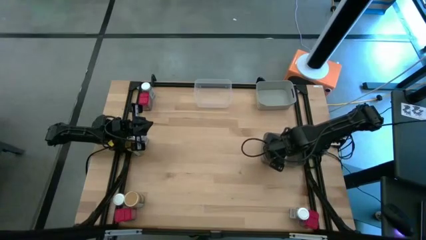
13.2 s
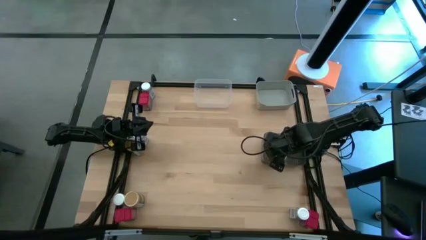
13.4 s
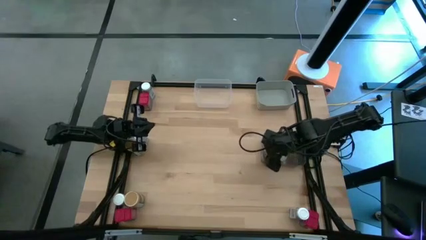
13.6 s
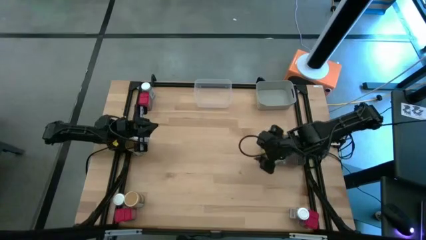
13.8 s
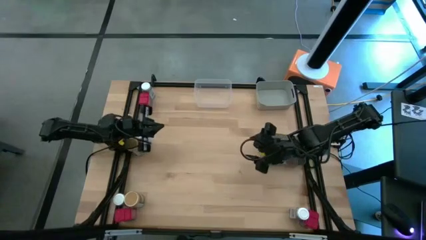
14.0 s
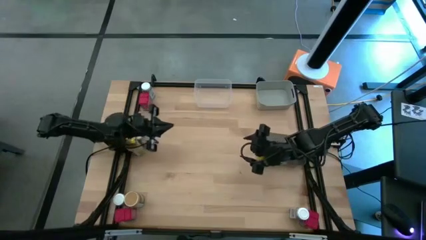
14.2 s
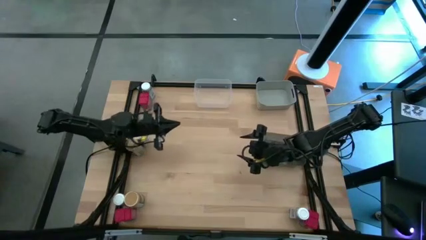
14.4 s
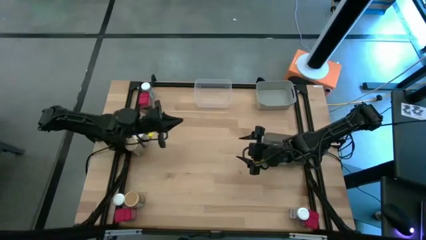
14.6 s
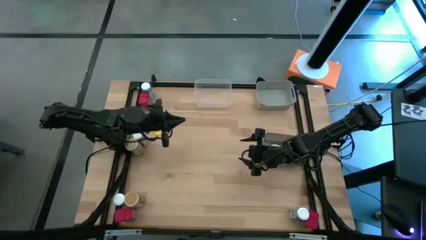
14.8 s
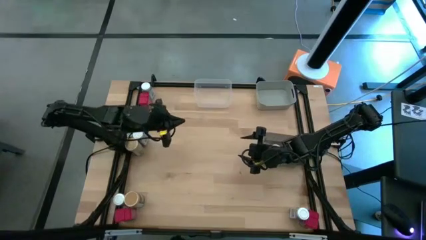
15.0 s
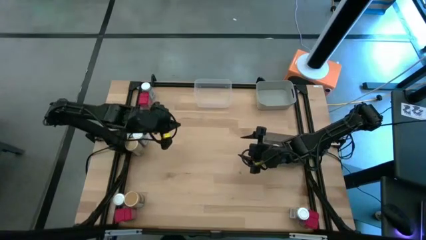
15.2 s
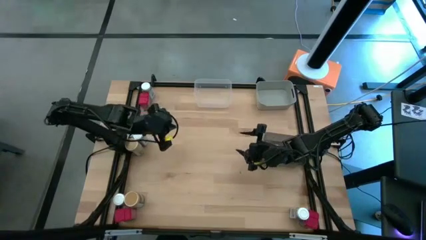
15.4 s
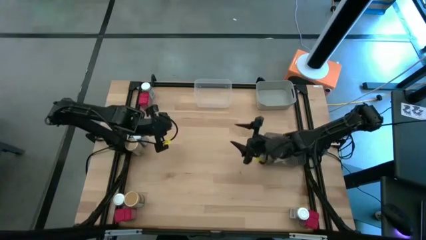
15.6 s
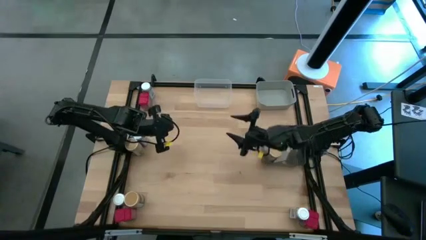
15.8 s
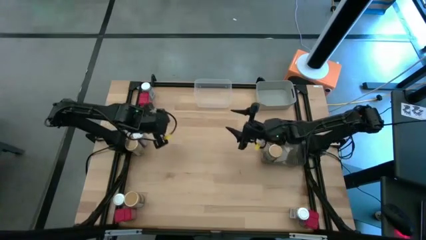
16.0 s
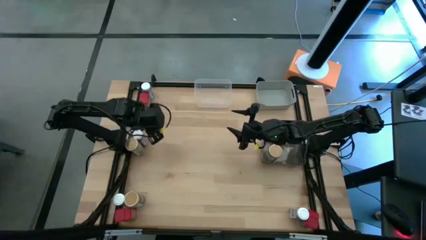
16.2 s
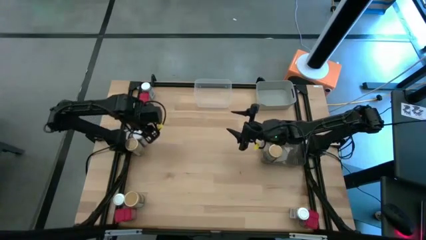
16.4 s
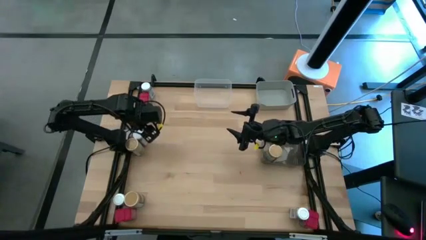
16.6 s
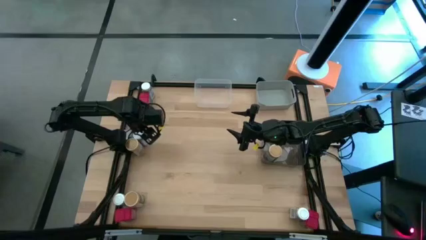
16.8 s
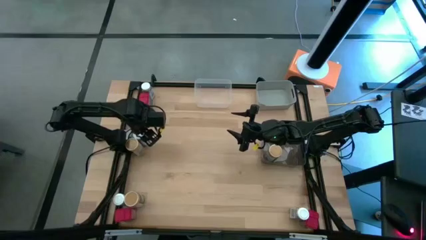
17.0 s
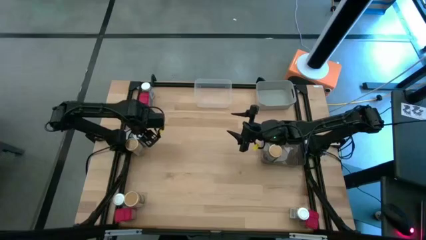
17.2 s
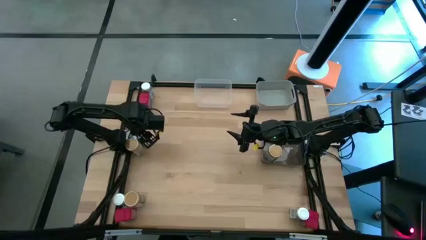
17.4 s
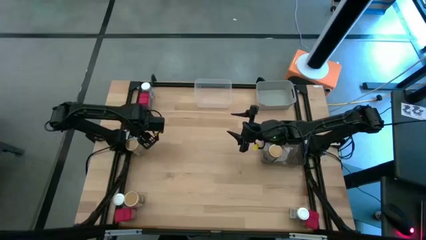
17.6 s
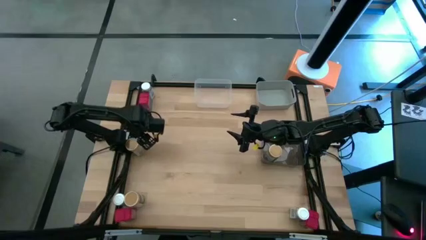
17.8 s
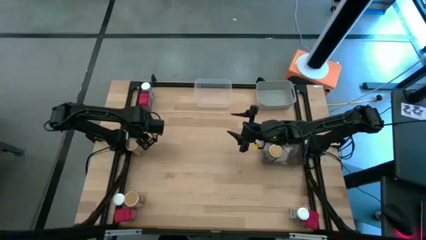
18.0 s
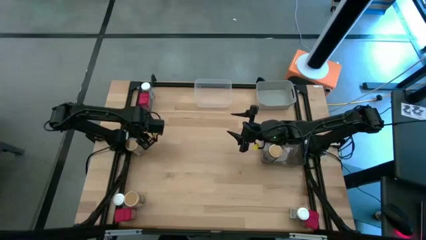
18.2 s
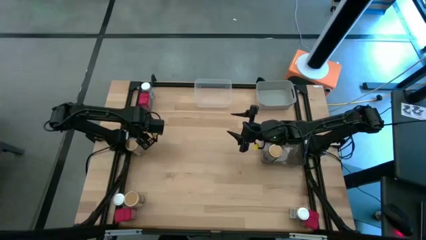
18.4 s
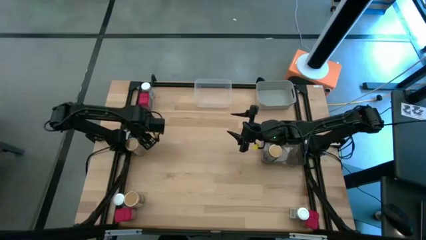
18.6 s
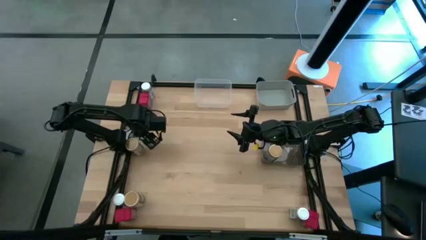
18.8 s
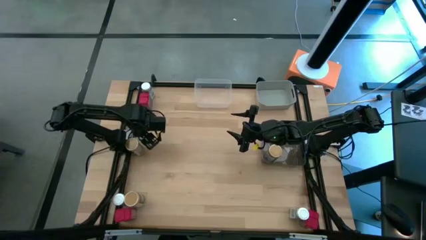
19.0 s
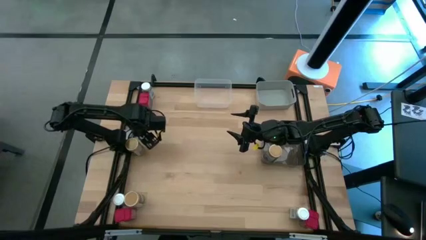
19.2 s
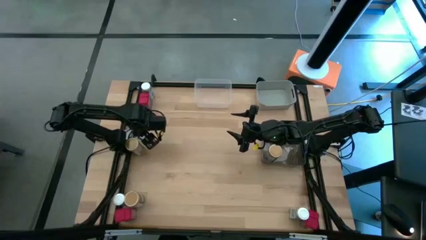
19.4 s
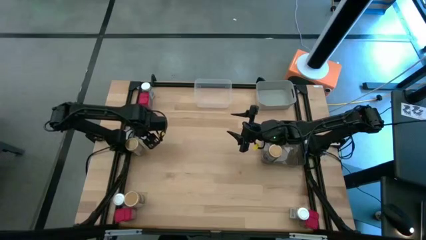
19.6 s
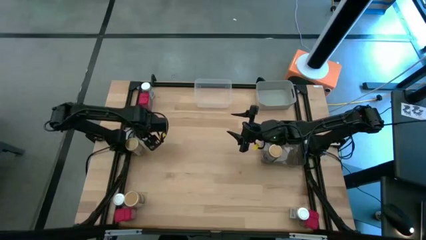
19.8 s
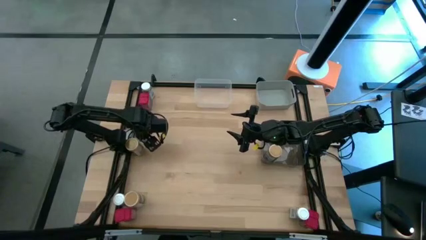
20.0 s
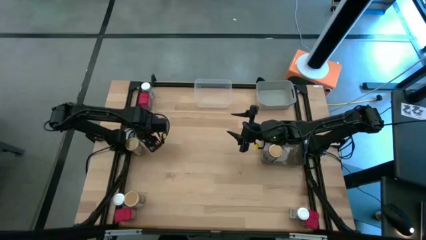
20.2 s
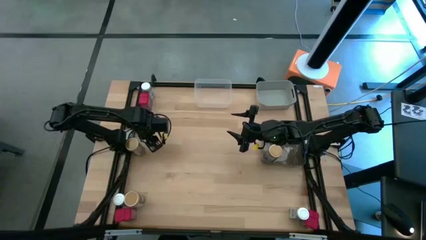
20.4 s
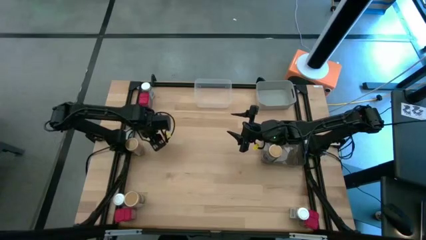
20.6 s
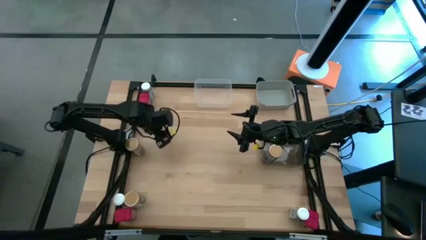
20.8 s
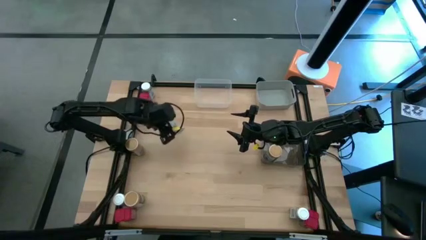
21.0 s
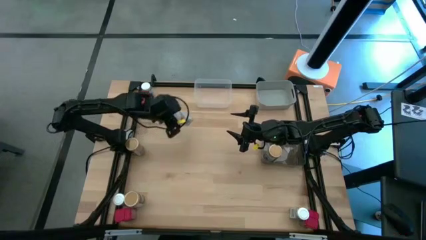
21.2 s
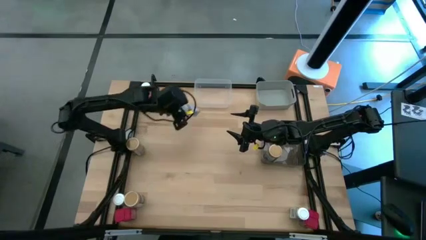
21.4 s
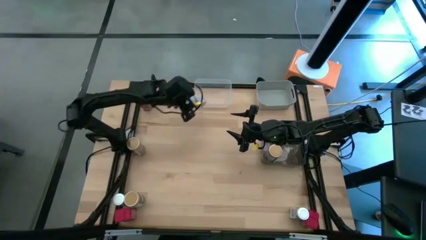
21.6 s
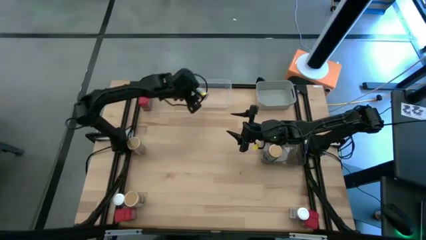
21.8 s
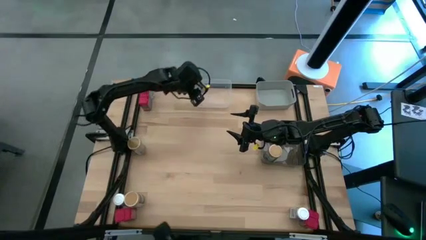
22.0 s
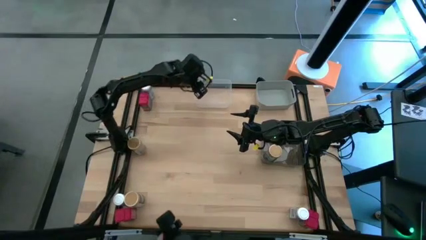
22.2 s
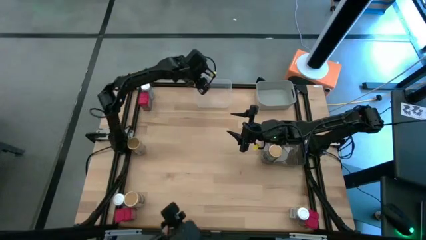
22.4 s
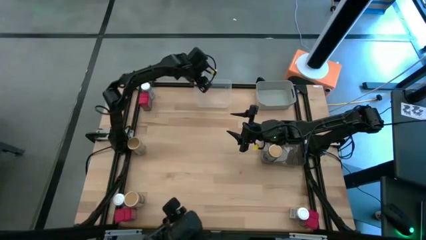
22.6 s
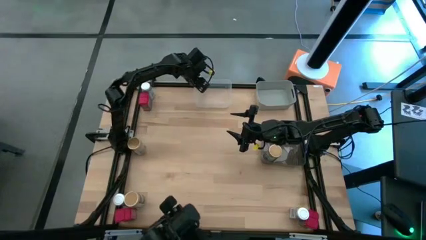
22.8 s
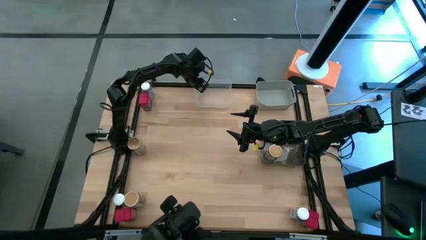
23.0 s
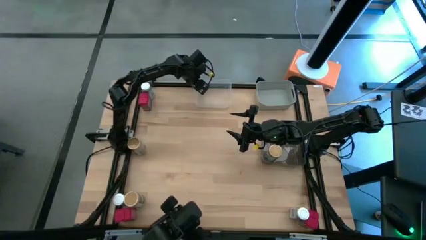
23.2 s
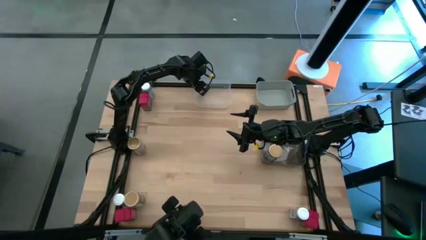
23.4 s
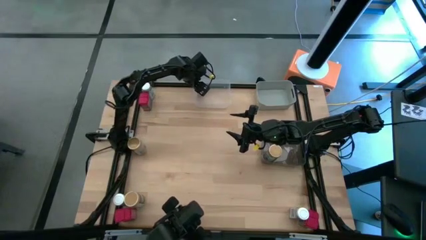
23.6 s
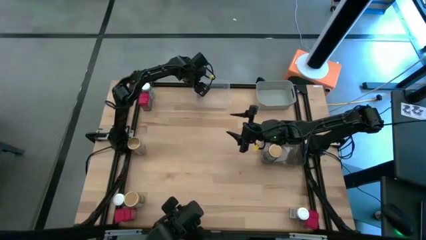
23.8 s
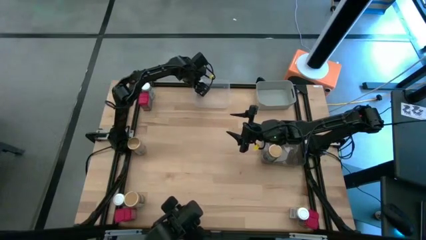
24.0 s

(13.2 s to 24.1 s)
Task: Sort spices by type
Put the middle left white seasoning bottle into the left transparent bin
